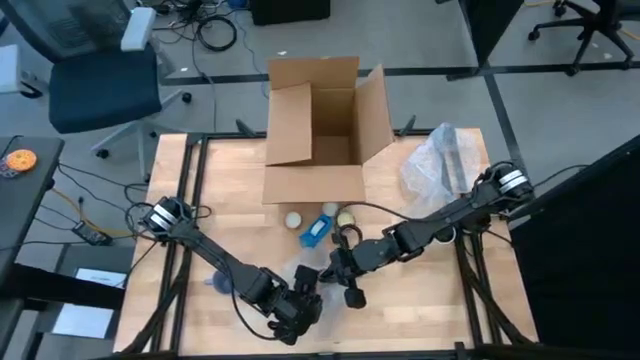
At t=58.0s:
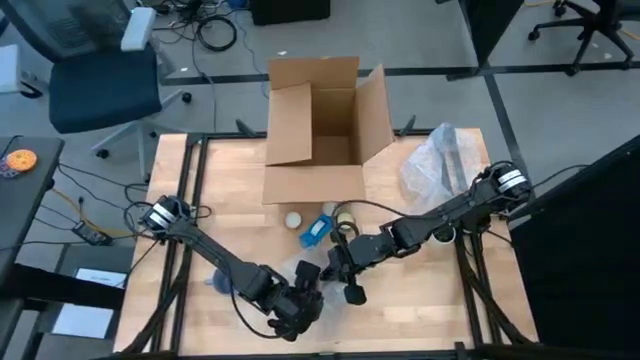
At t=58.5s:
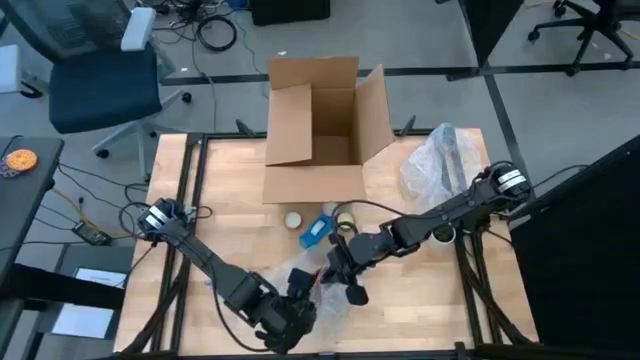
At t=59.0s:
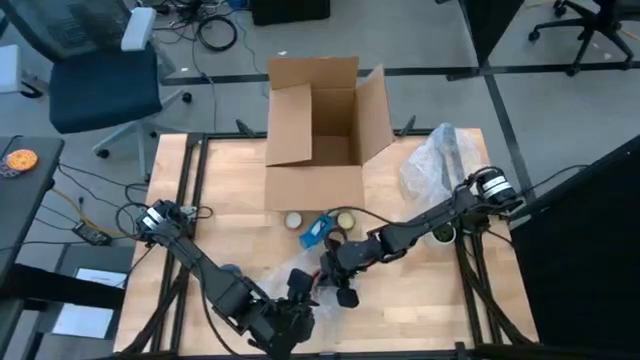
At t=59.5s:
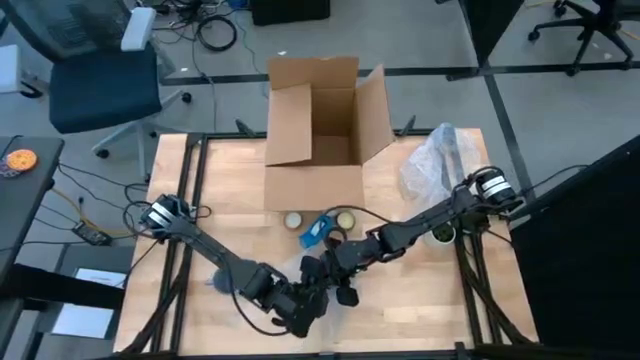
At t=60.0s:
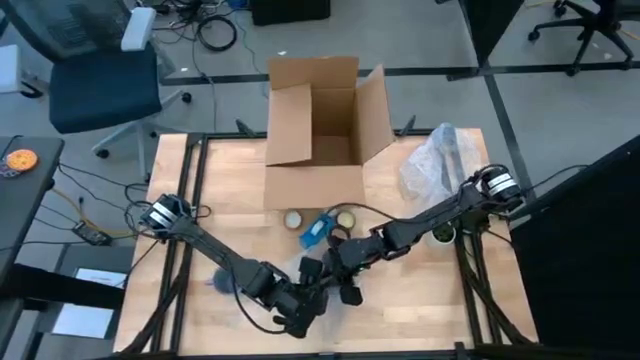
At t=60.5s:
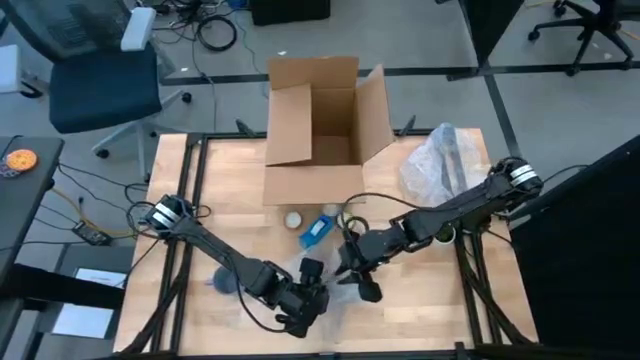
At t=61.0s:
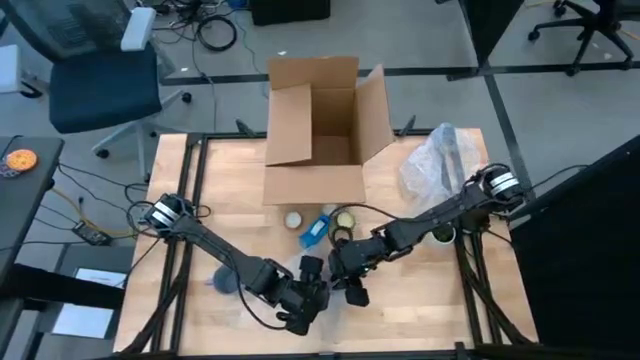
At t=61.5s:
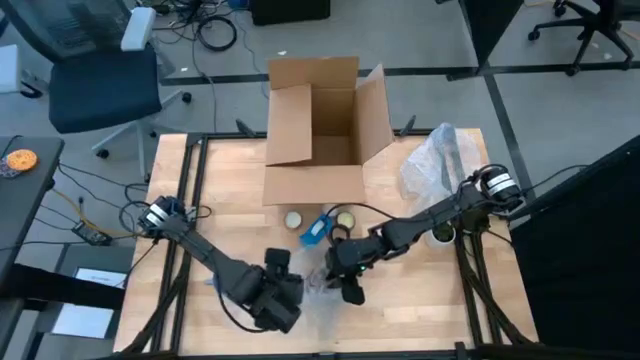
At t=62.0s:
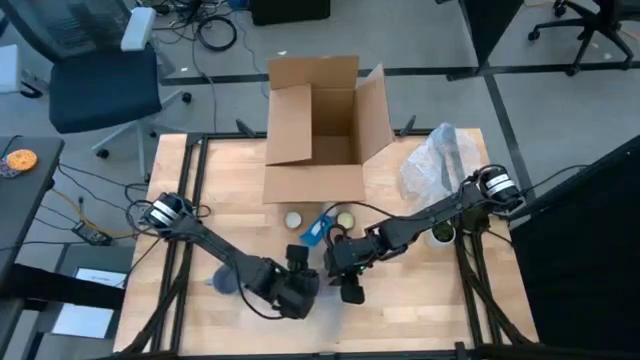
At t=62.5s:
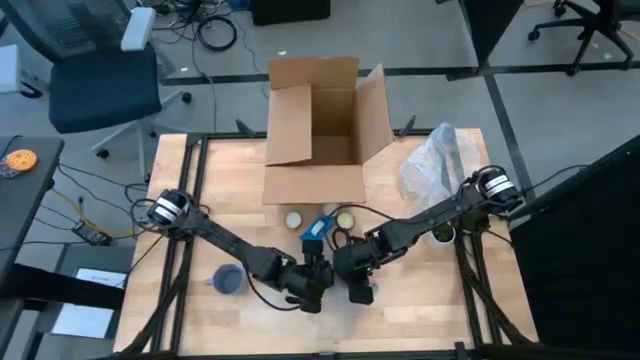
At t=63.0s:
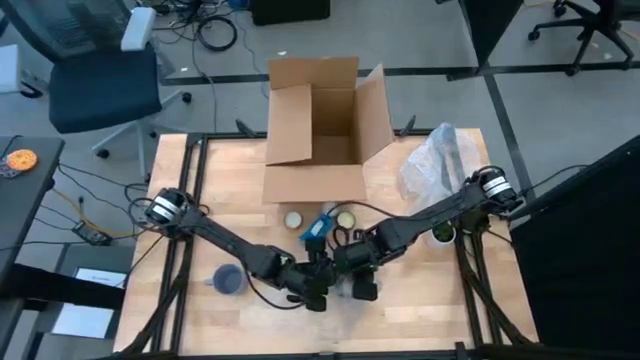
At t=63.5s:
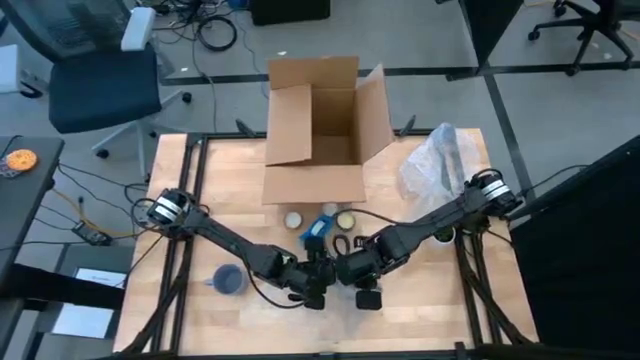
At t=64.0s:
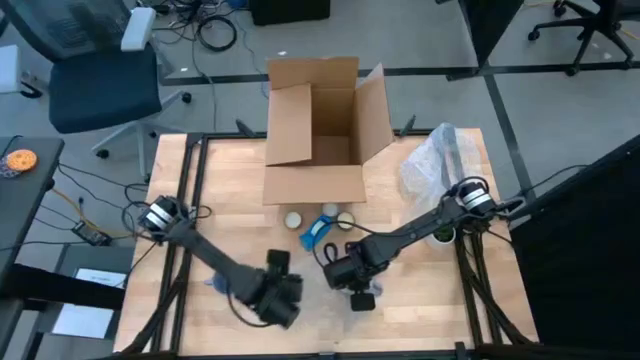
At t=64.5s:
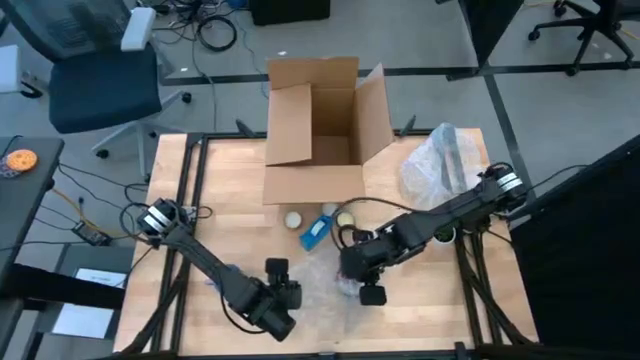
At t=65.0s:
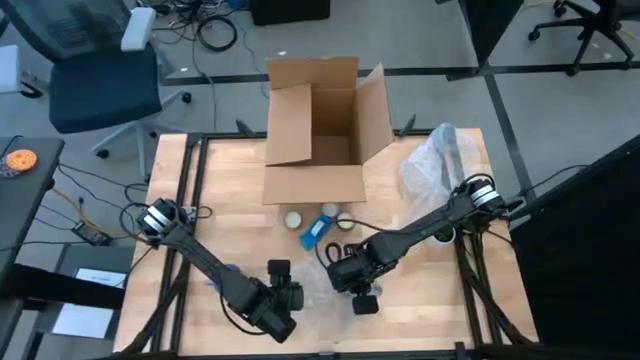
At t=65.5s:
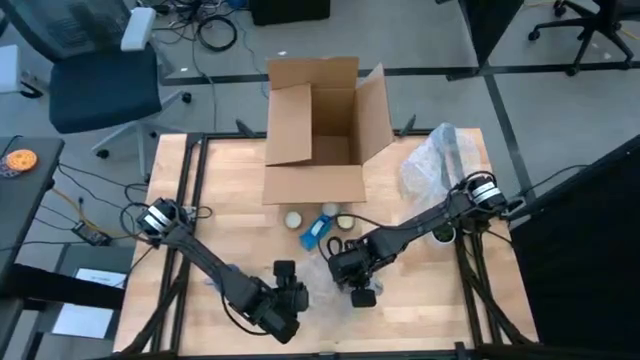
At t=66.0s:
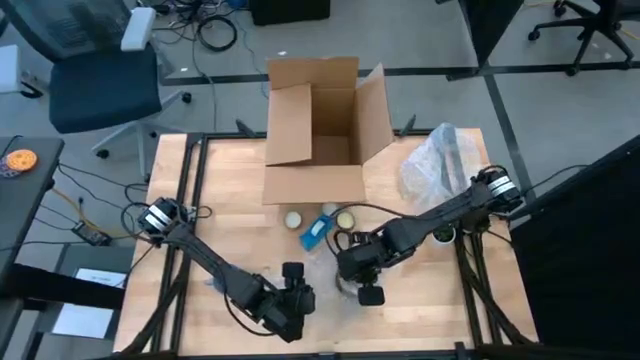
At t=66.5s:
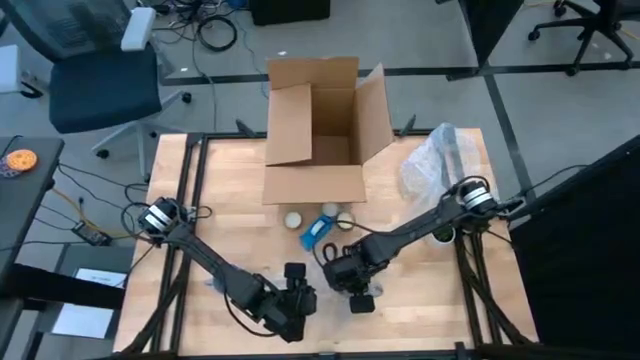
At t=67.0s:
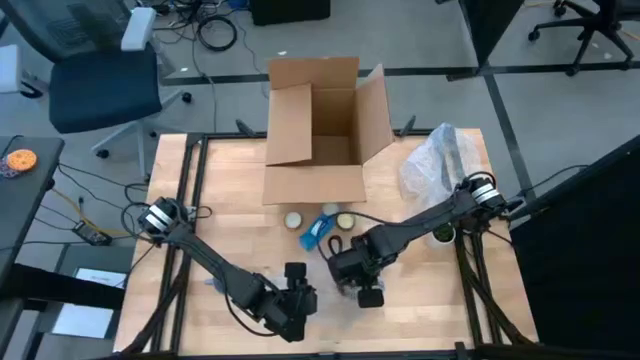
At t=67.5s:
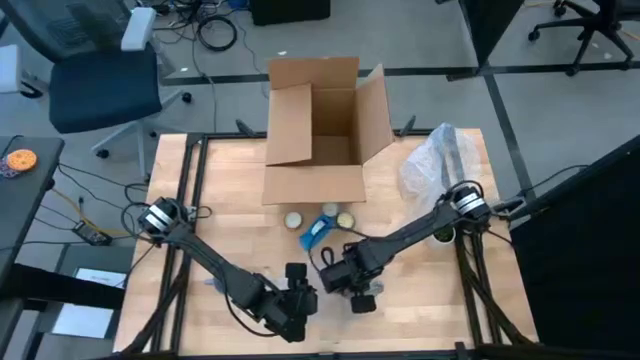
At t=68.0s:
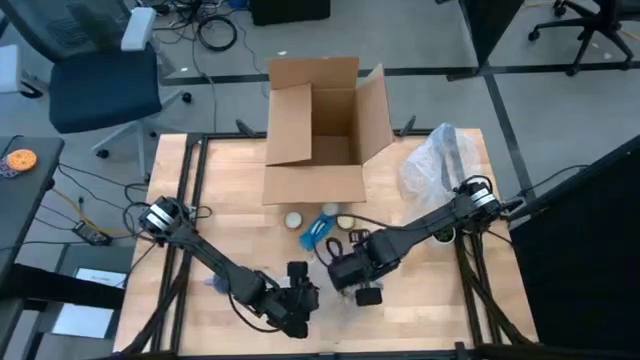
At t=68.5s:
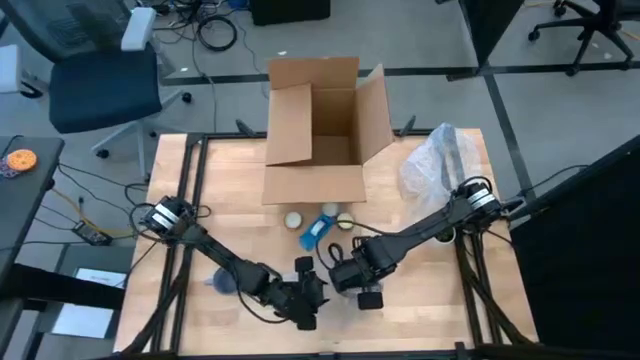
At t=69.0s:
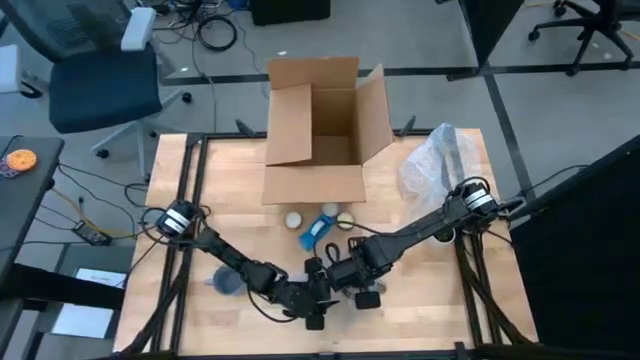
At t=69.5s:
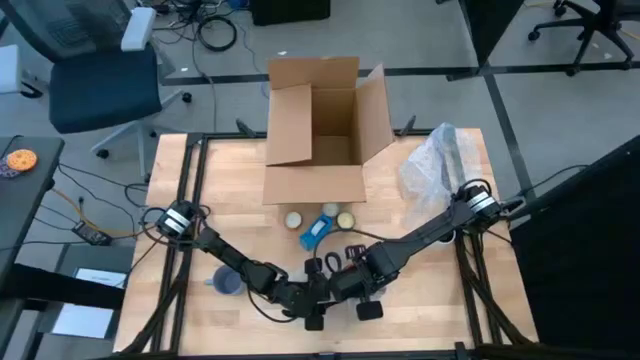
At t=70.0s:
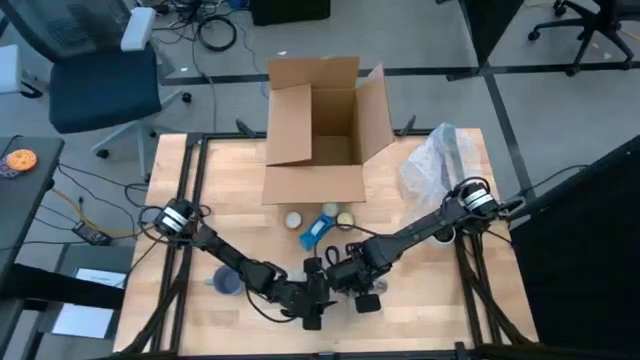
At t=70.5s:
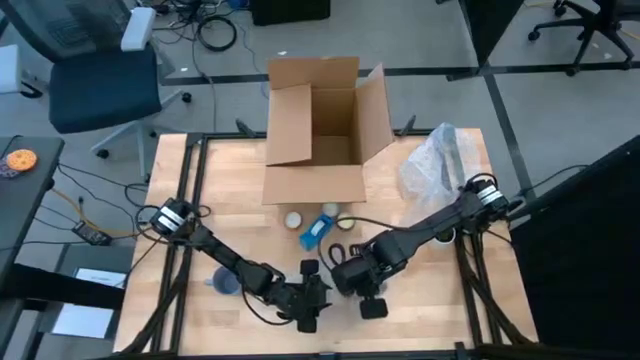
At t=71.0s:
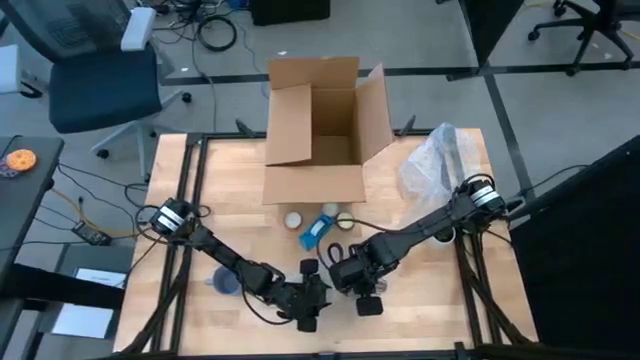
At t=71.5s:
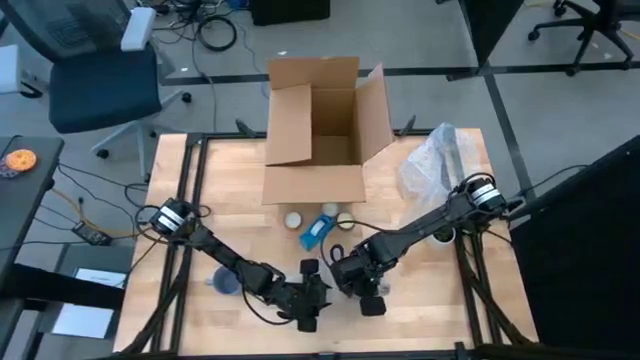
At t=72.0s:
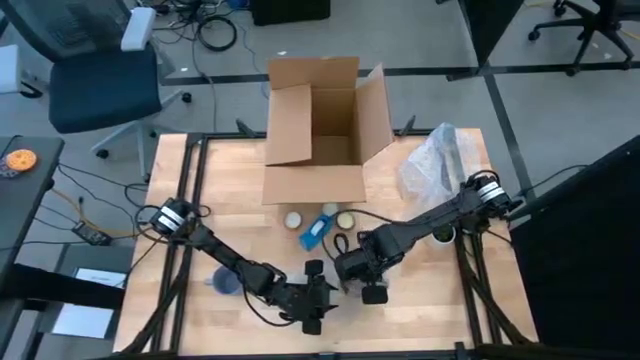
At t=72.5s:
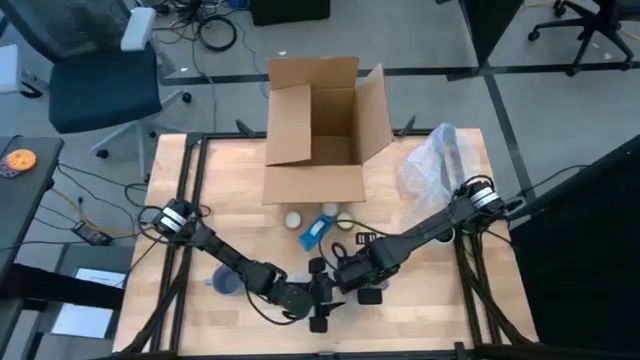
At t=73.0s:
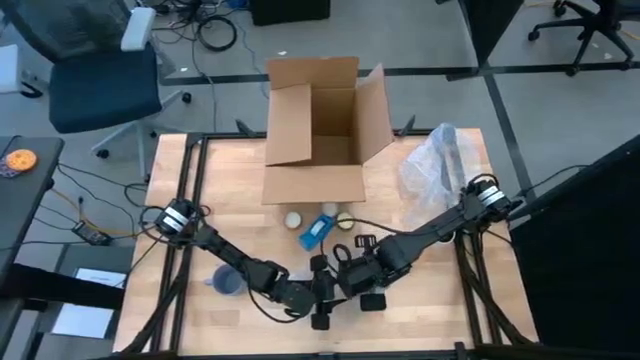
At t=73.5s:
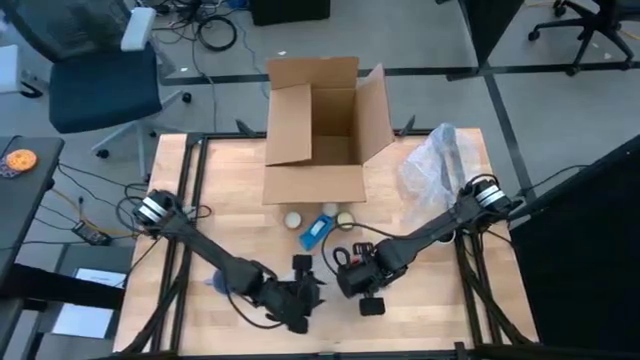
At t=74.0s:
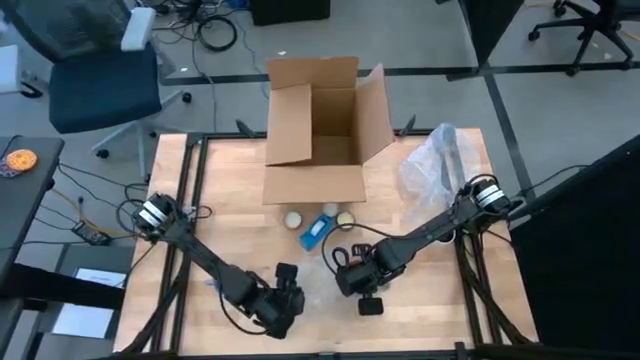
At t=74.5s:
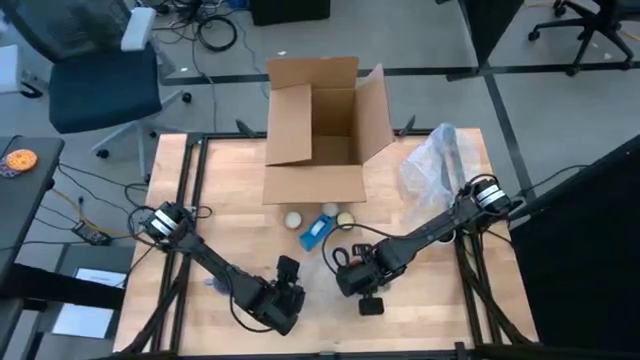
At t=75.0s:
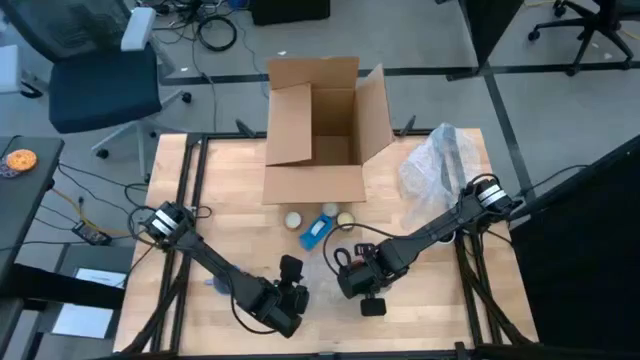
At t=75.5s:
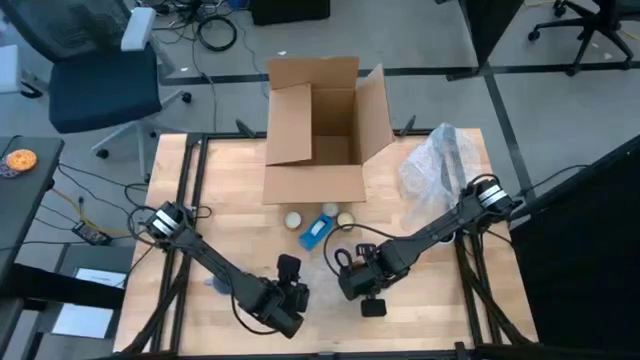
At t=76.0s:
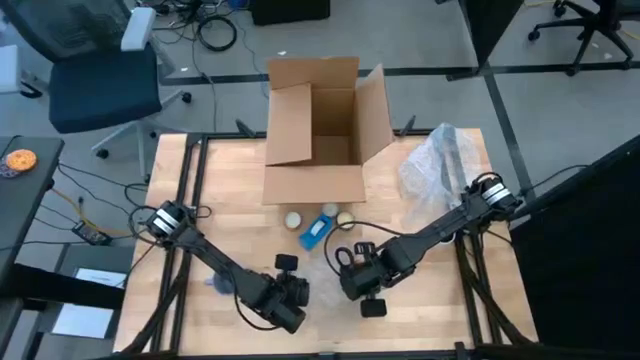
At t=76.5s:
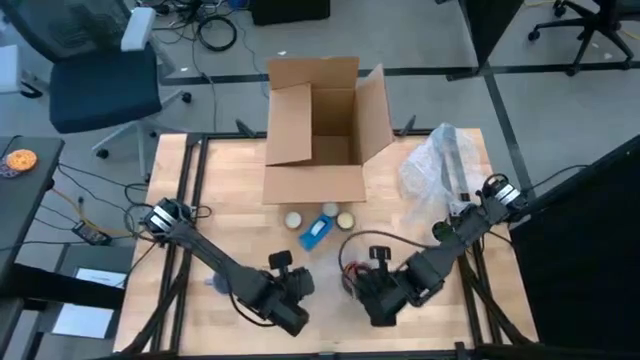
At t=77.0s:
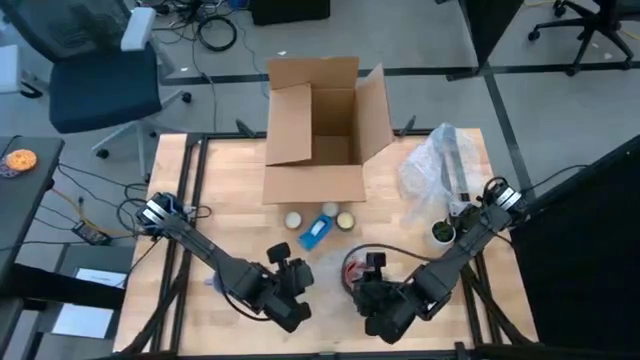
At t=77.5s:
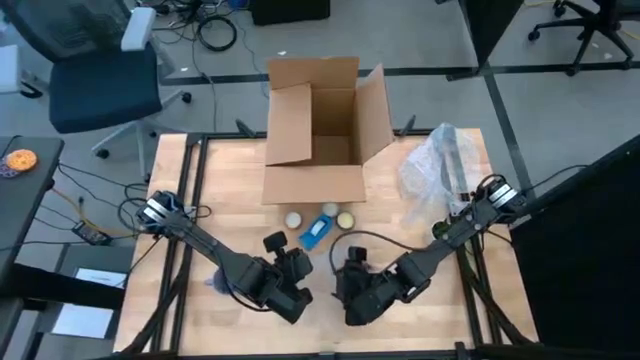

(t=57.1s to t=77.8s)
Task: wrap mug
Wrap the black mug with the bubble wrap
